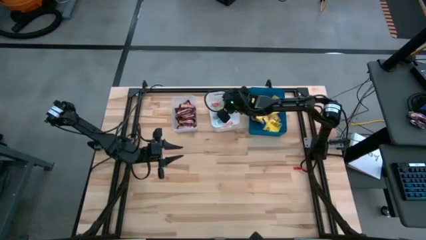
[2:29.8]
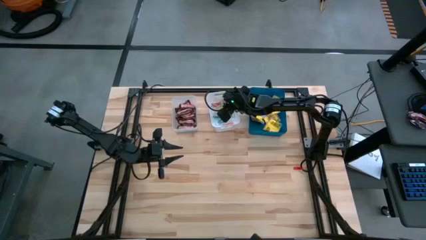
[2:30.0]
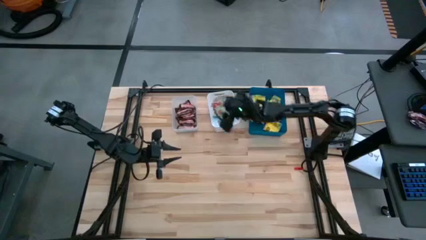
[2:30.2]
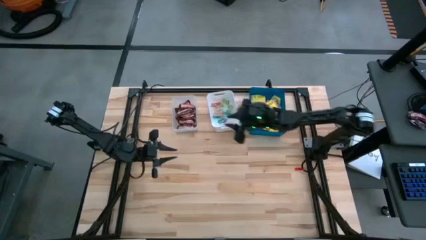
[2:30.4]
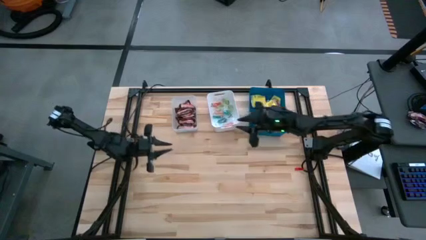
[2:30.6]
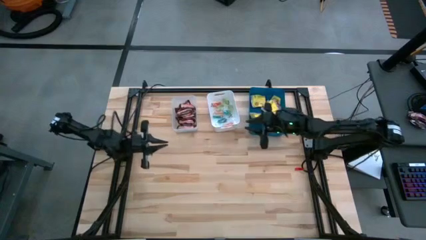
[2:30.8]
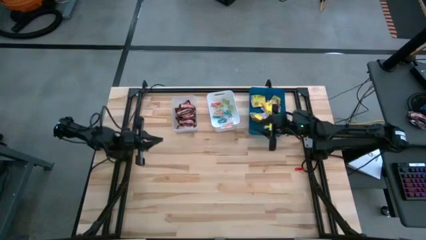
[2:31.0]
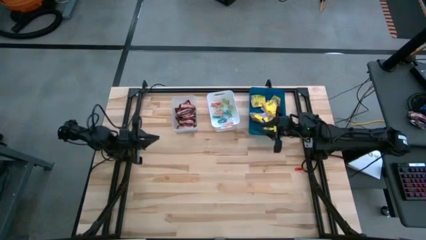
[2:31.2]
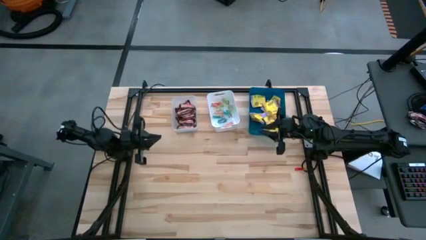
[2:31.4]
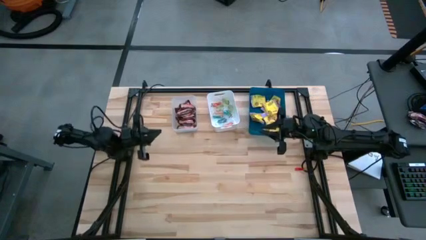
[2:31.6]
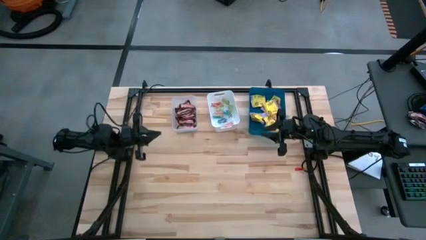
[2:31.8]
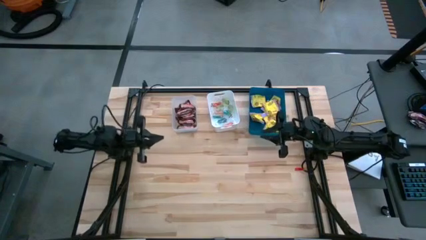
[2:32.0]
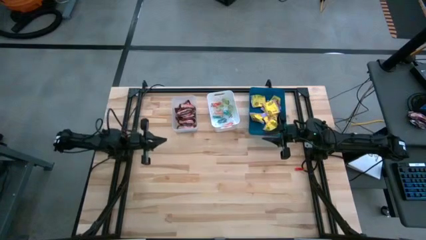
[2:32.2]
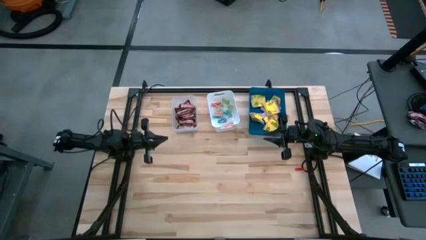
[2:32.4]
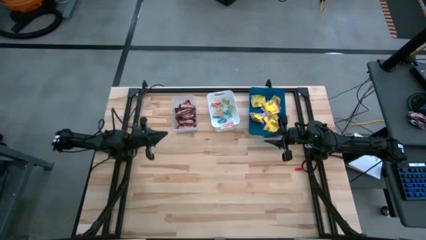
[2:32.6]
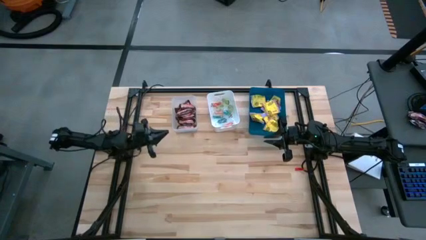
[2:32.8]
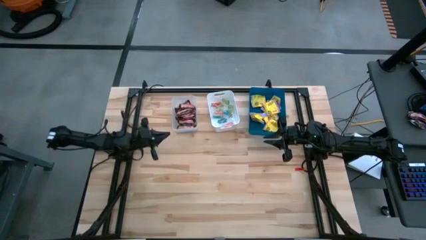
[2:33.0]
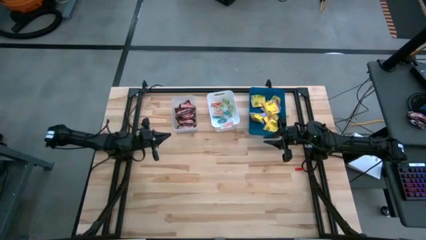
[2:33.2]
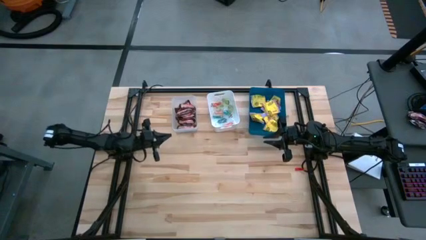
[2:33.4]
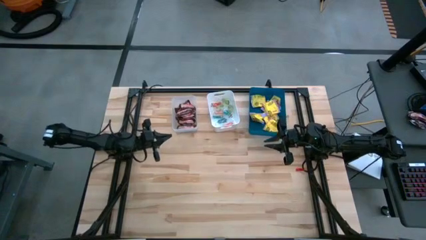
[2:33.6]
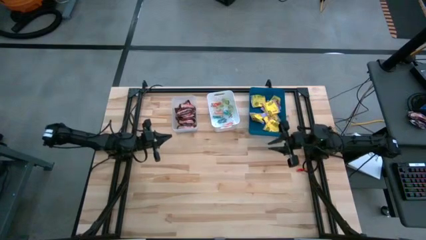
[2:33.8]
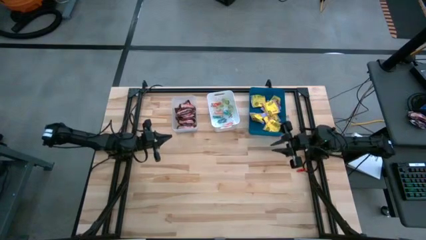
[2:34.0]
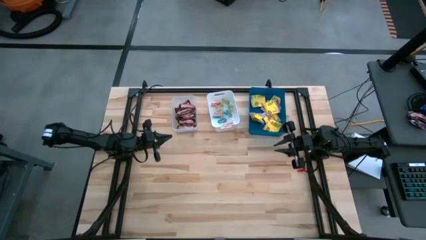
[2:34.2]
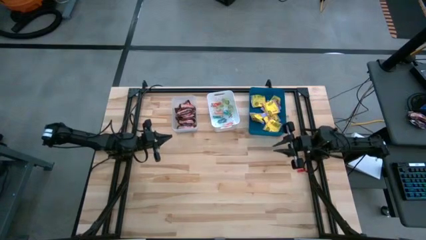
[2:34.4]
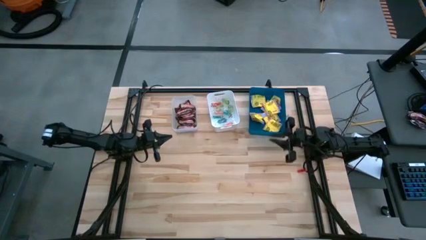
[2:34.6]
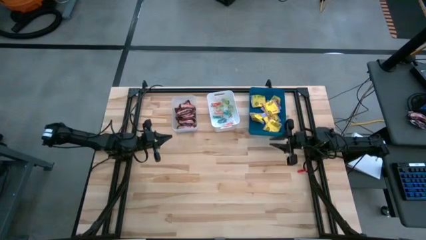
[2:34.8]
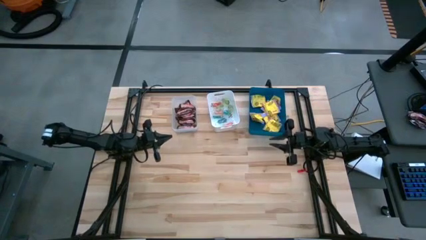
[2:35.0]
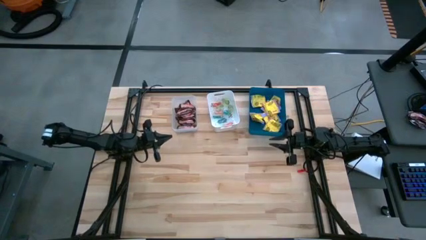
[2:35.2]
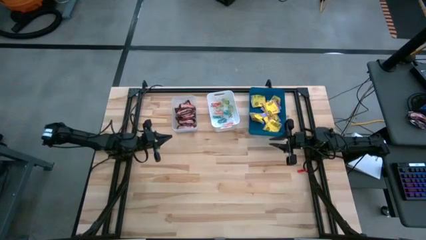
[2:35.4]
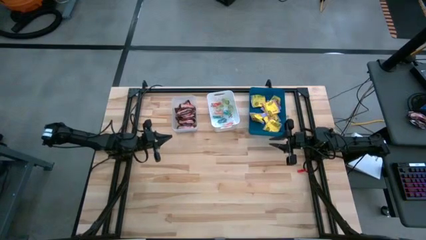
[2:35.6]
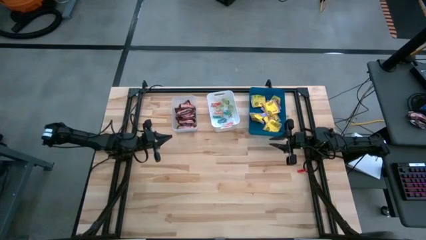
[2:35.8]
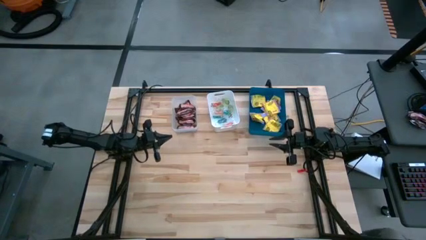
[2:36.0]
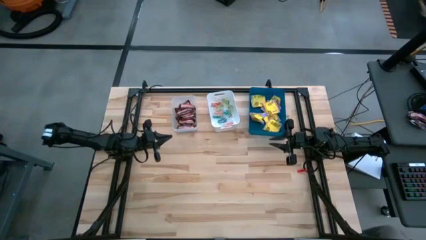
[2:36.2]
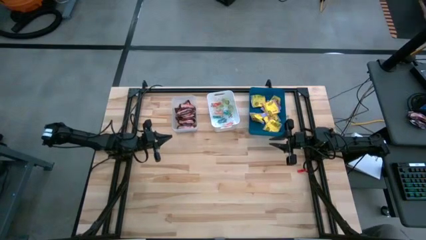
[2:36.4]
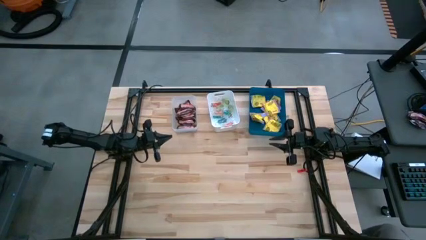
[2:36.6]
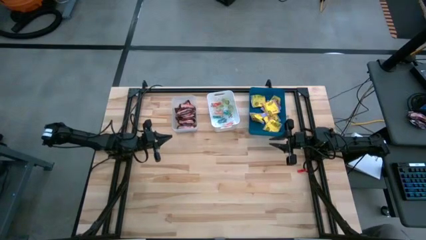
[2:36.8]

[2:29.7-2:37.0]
Task: Sort candy
Return to Home Position

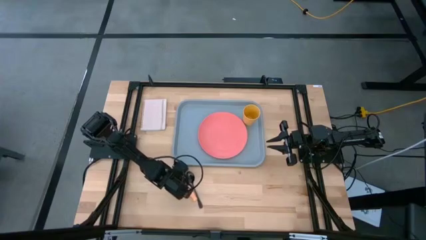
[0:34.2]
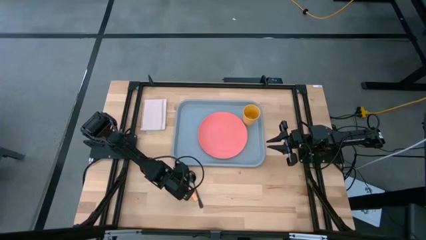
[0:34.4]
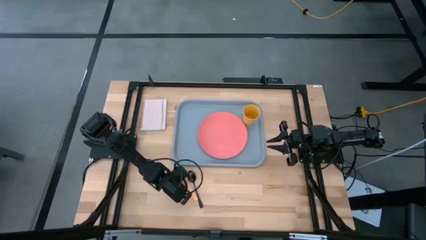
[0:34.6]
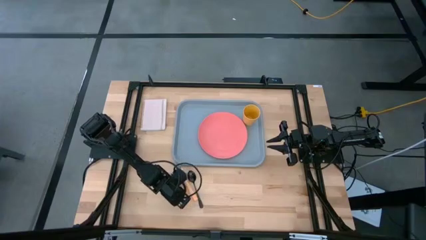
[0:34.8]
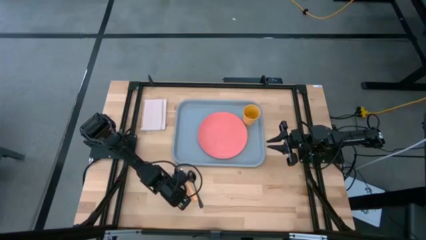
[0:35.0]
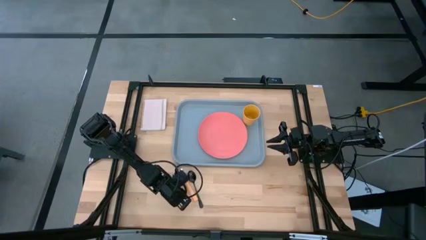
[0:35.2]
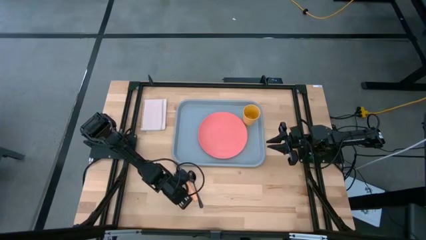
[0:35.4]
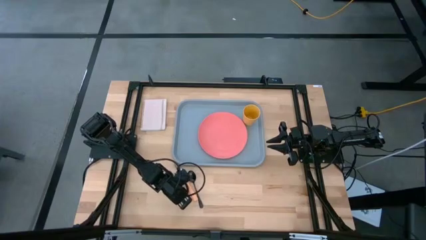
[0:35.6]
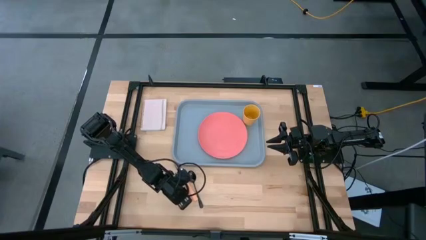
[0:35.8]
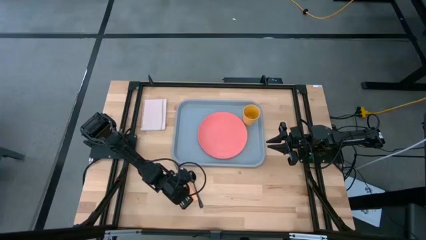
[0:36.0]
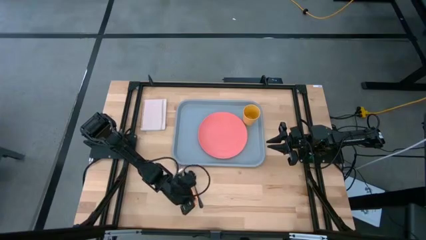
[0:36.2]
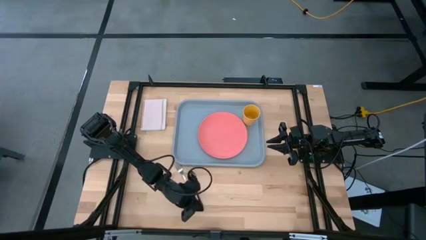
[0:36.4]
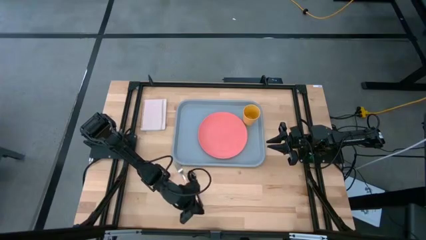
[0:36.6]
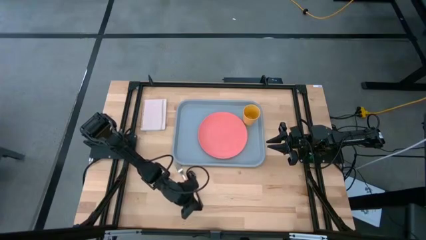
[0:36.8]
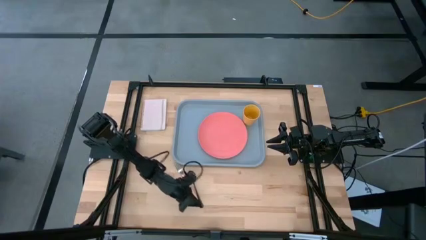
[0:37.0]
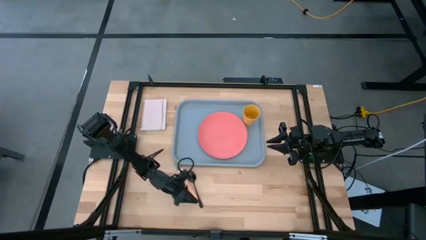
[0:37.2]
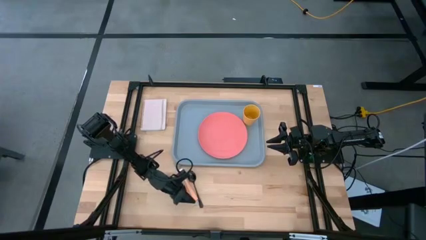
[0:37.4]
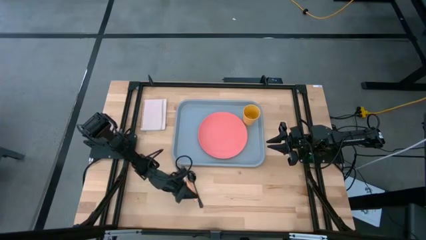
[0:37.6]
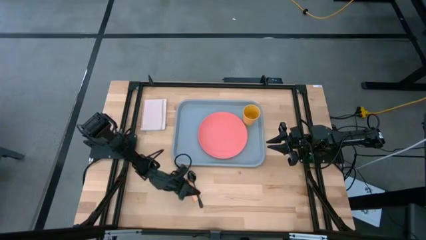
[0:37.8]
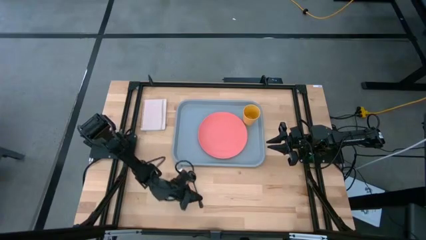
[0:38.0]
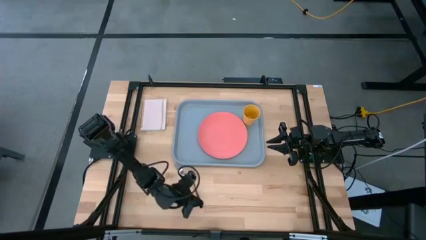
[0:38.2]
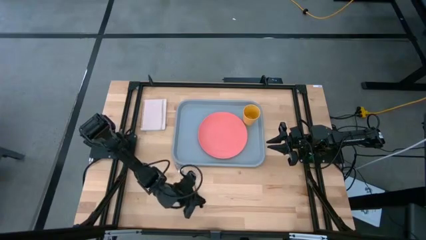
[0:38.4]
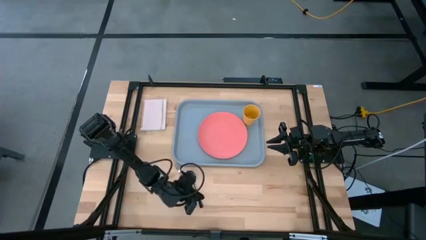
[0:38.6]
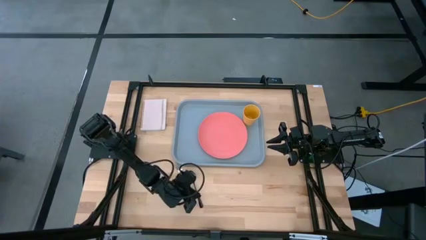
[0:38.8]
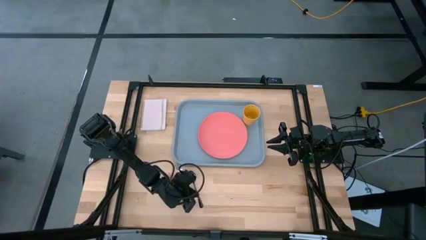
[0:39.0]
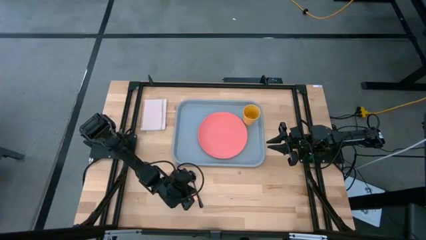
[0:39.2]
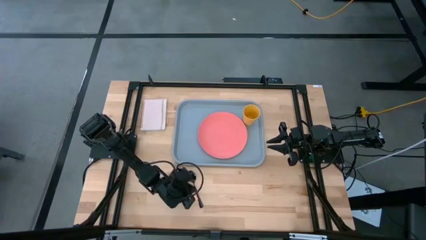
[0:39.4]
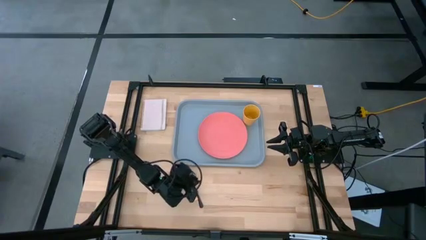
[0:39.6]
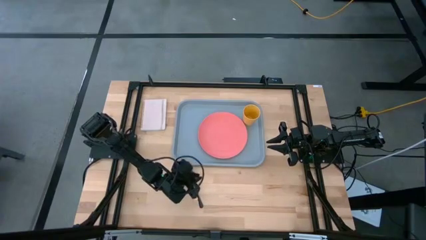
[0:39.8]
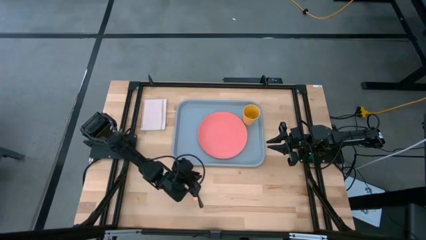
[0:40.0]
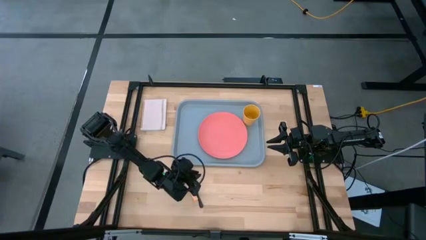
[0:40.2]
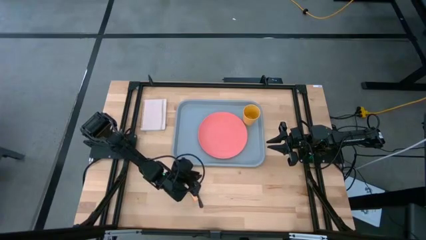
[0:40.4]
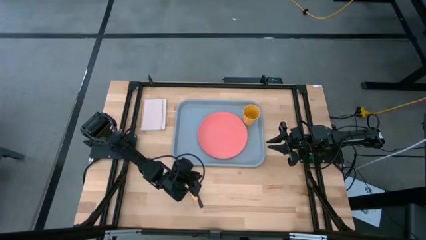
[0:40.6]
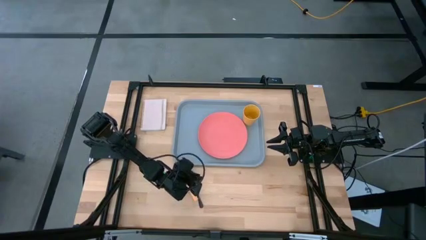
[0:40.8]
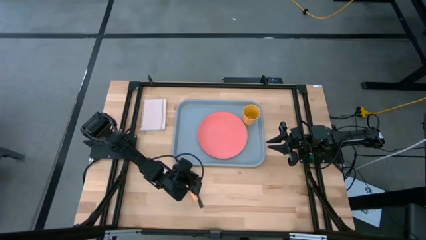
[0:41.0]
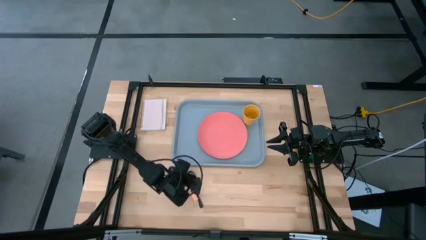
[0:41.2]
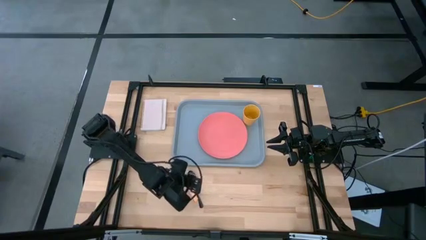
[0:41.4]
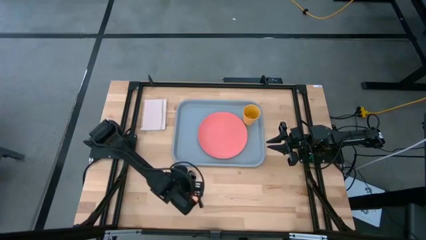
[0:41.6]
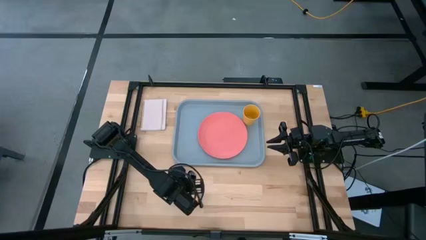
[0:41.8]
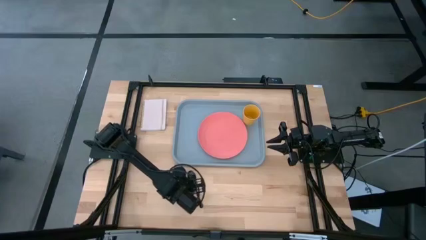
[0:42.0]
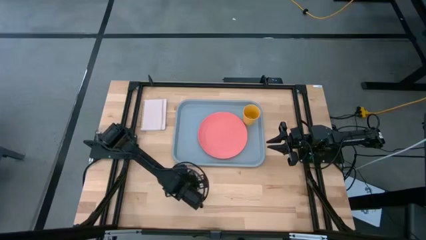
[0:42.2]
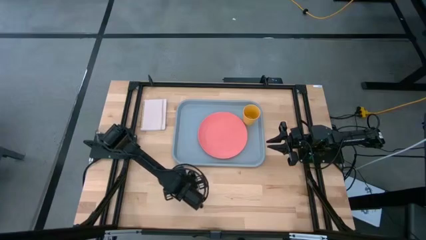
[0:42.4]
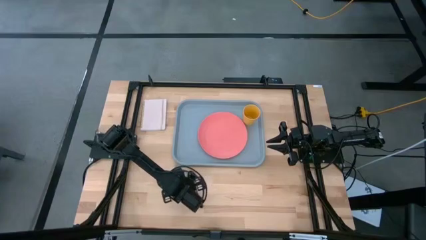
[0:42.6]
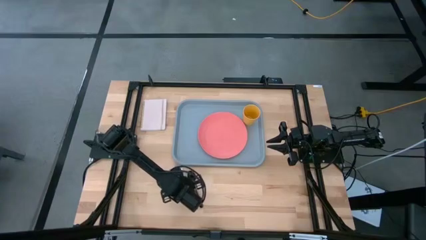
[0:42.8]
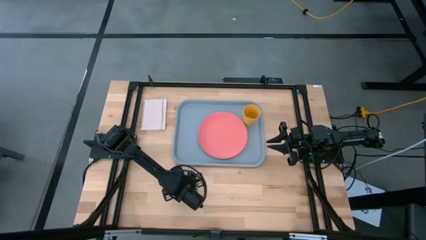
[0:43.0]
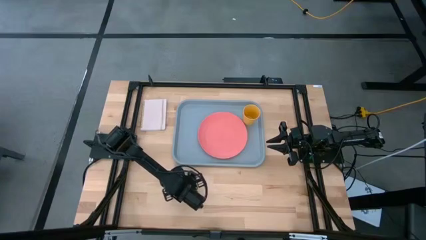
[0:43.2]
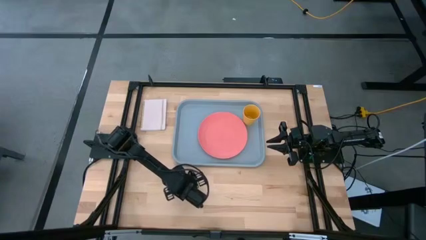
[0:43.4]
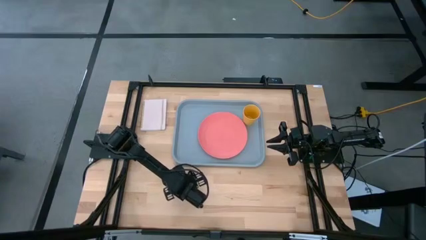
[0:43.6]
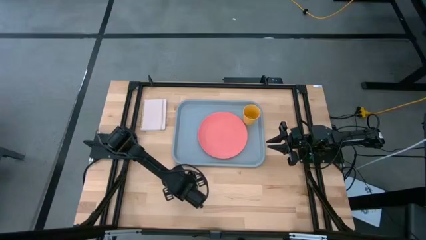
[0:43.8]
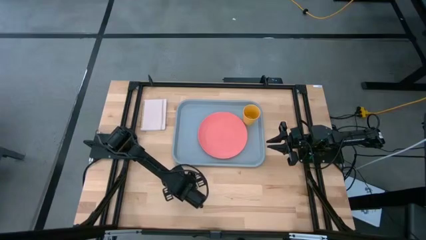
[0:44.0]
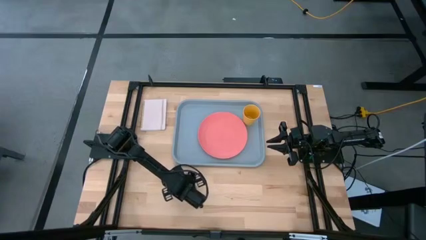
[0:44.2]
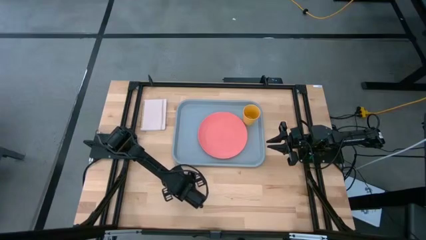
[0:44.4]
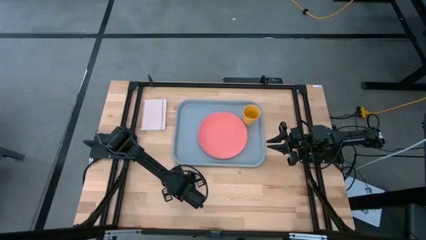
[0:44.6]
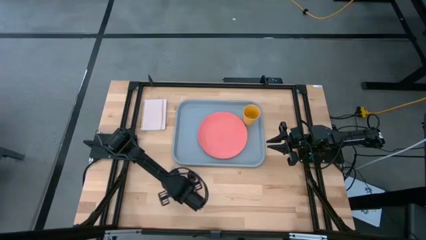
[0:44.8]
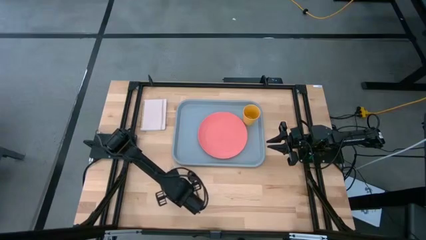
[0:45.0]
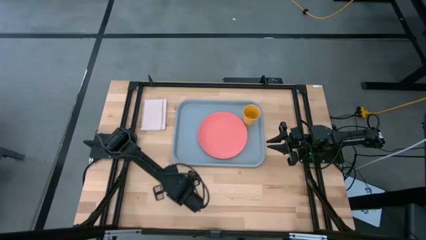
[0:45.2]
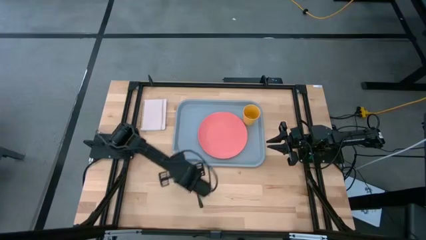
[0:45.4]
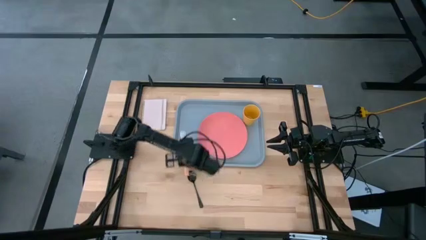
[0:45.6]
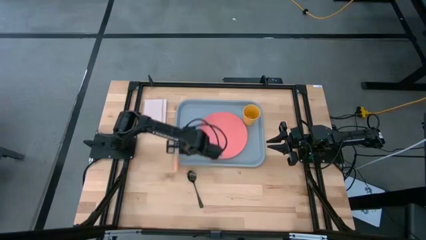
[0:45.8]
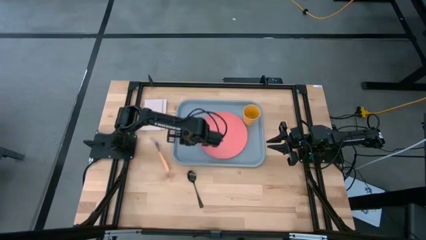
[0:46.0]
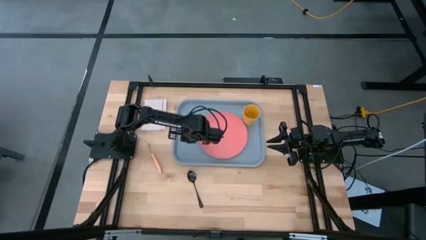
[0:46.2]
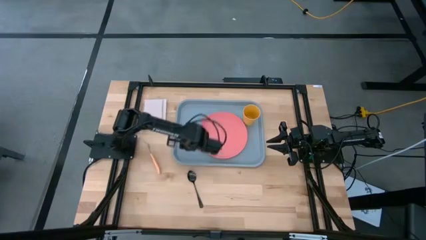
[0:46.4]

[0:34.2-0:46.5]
Task: Pick and place plate/cup/fork/spoon on tray
Put the fork on the serving tray
